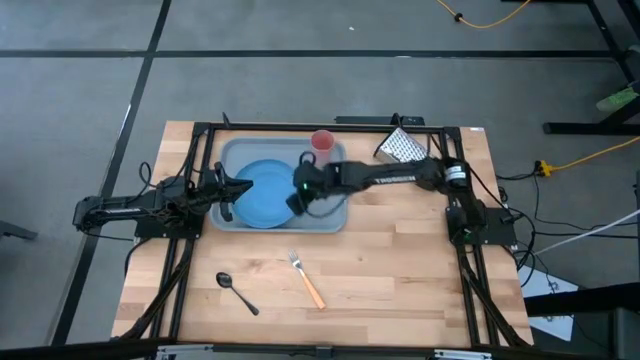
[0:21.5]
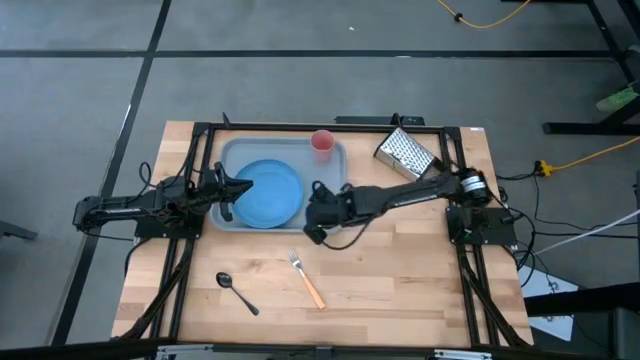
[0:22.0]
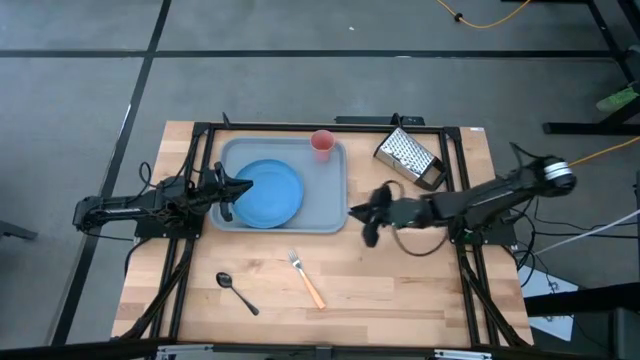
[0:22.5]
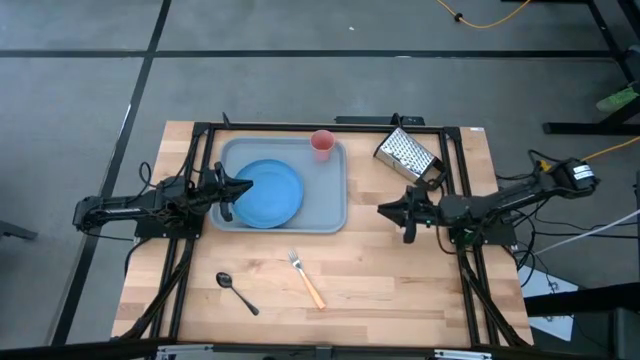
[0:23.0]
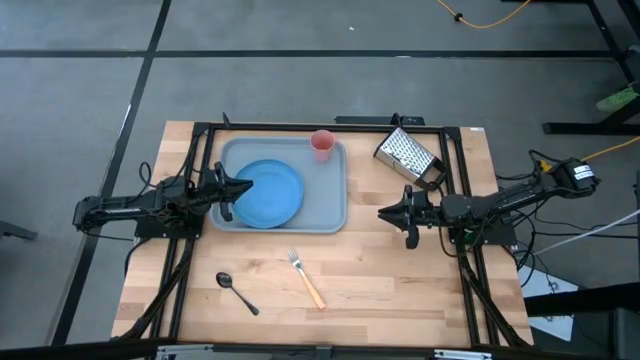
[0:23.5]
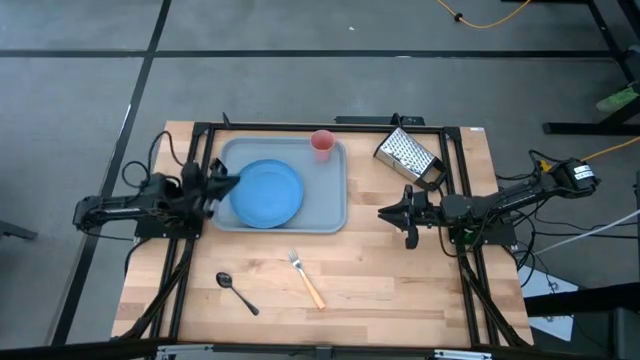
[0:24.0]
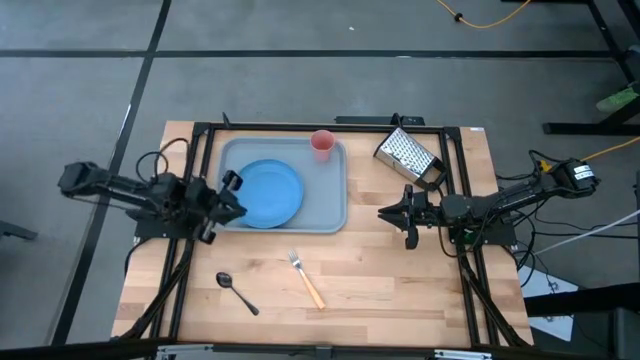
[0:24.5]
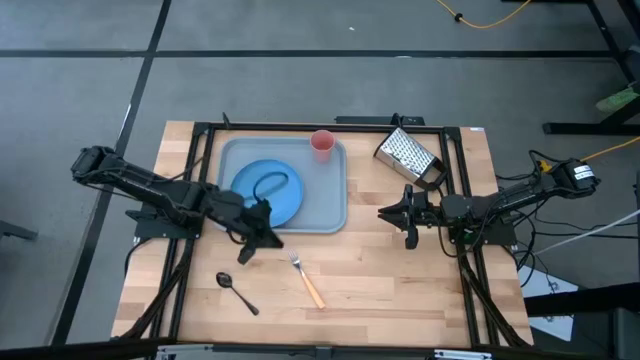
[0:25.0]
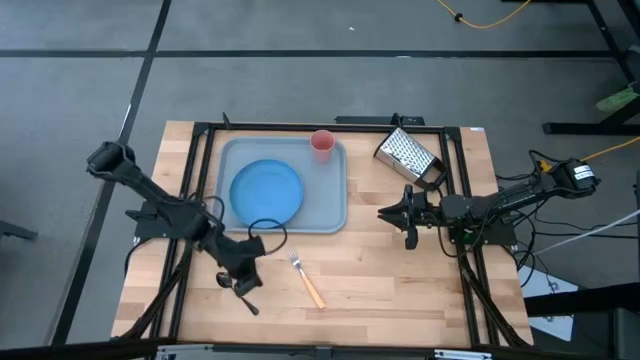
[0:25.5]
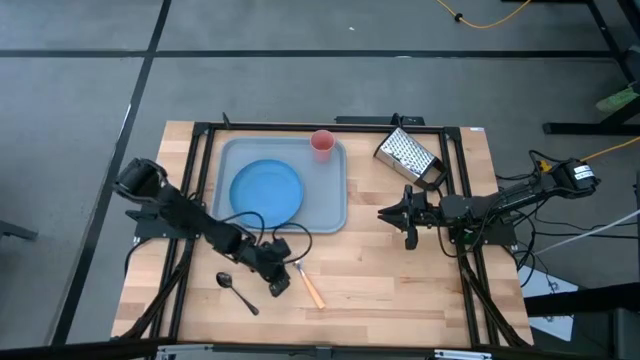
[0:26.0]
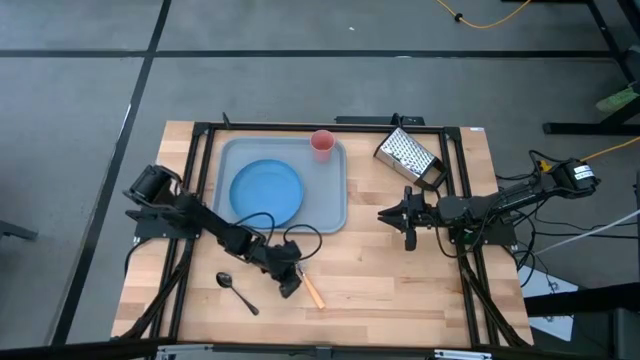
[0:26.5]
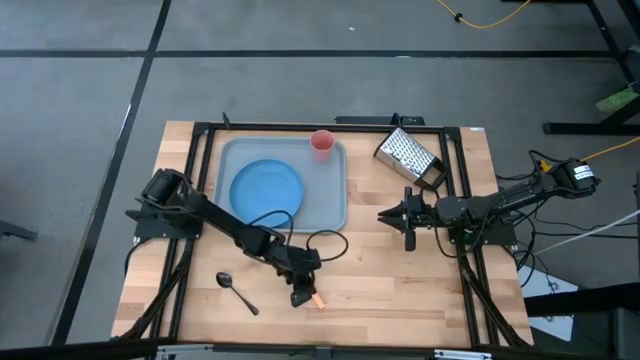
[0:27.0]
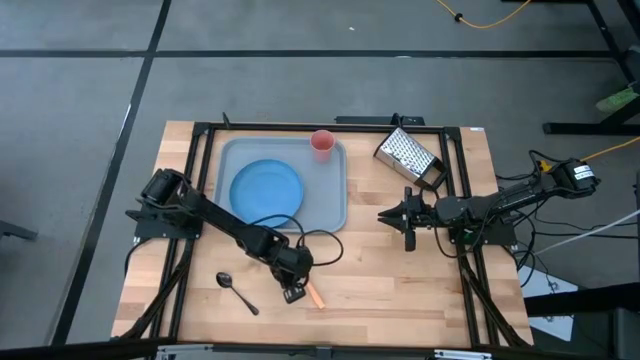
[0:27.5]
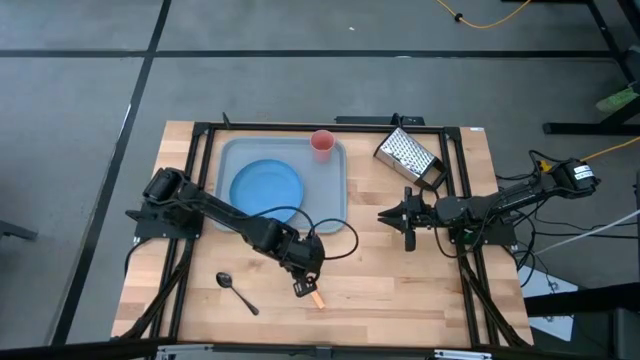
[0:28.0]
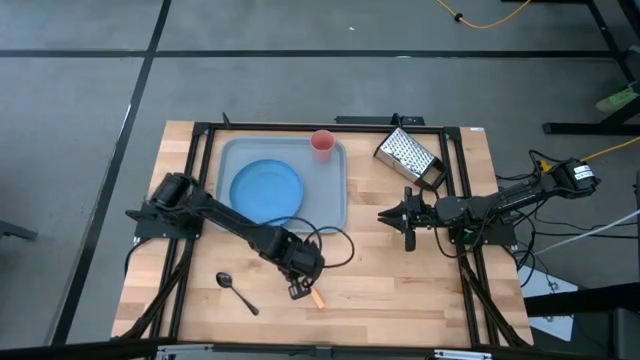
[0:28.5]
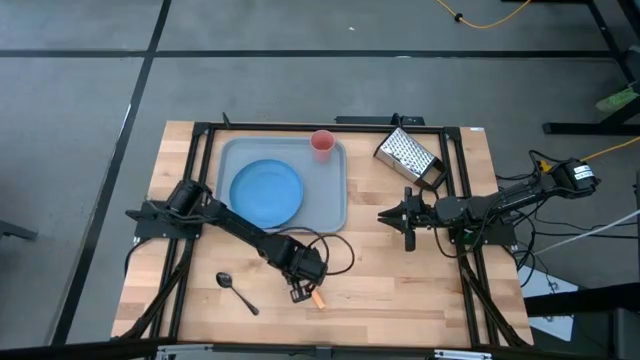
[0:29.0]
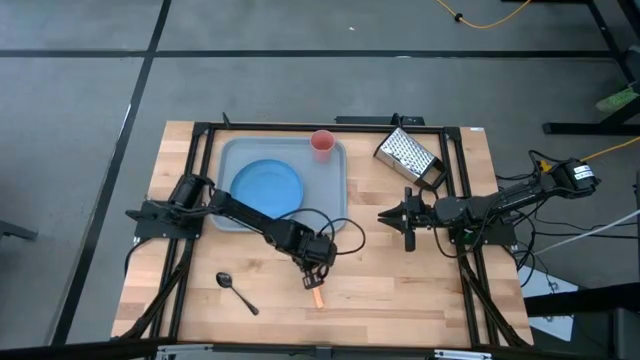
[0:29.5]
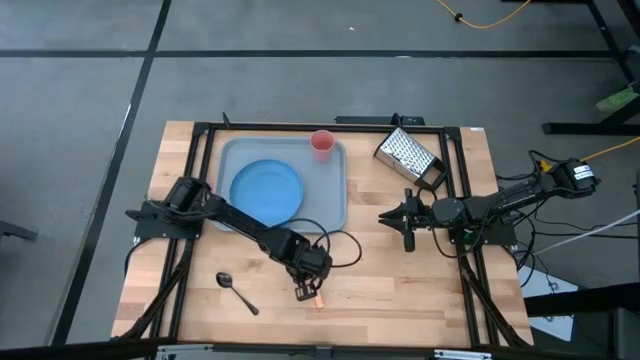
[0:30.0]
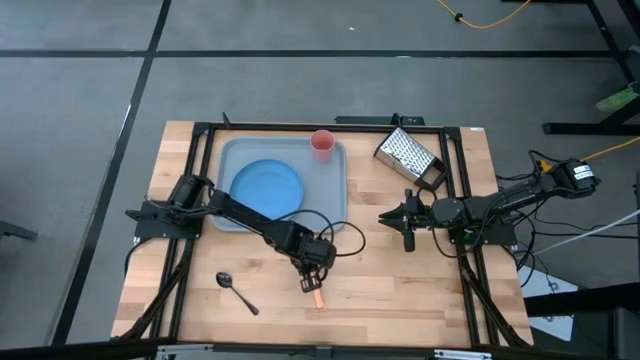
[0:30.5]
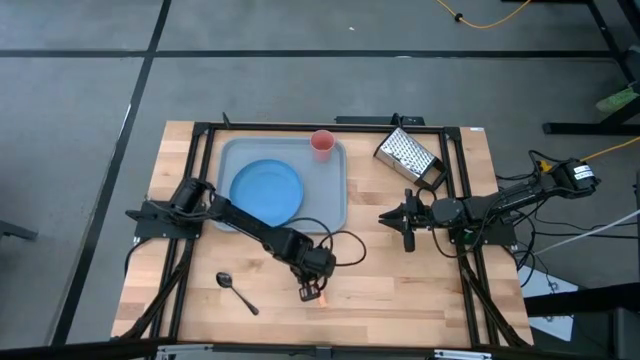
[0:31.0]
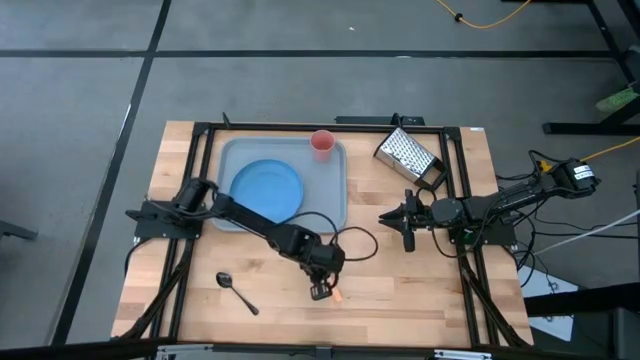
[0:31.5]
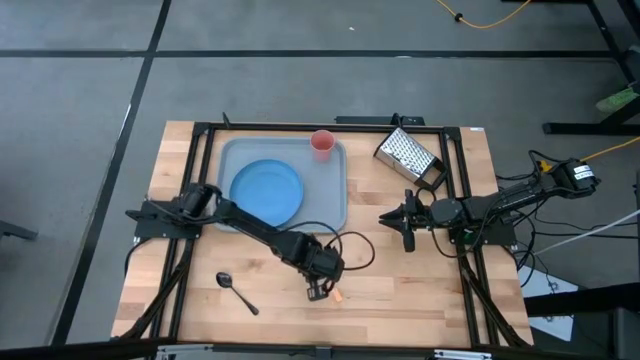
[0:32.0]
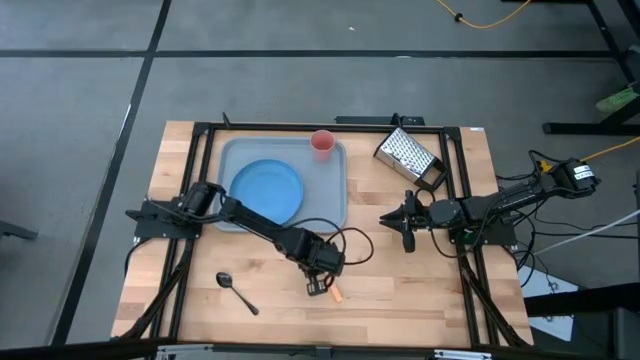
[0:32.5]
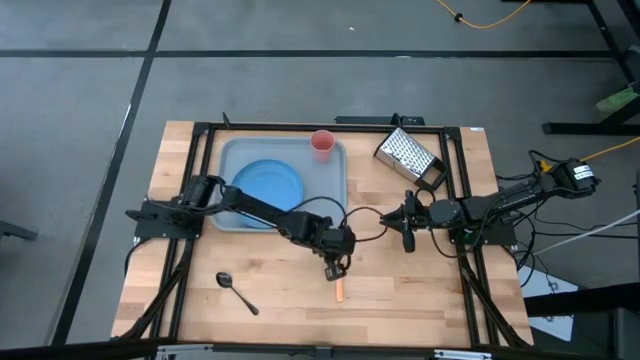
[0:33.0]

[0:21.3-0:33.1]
Task: Pick and place plate/cup/fork/spoon on tray
Move the orange fork to the bottom center of the table

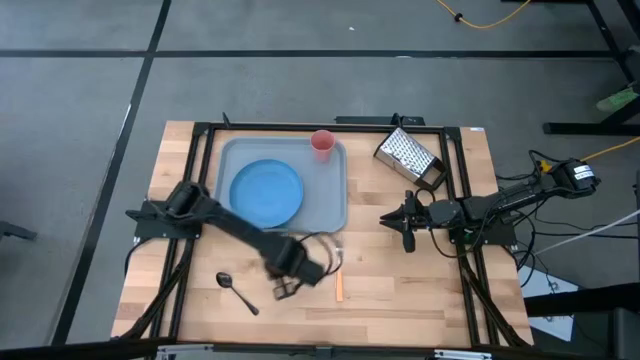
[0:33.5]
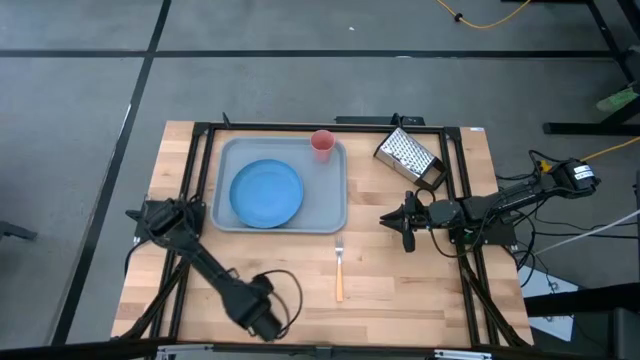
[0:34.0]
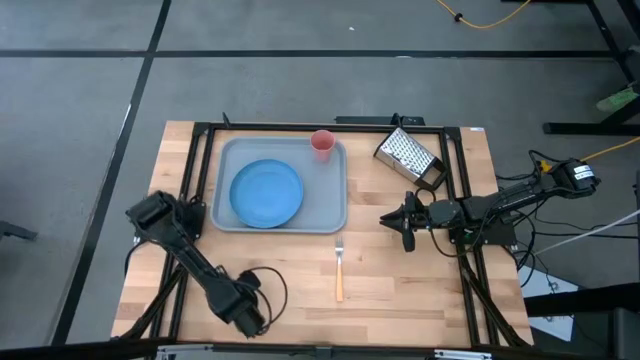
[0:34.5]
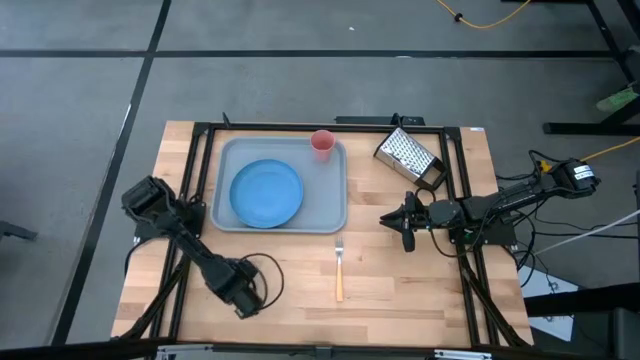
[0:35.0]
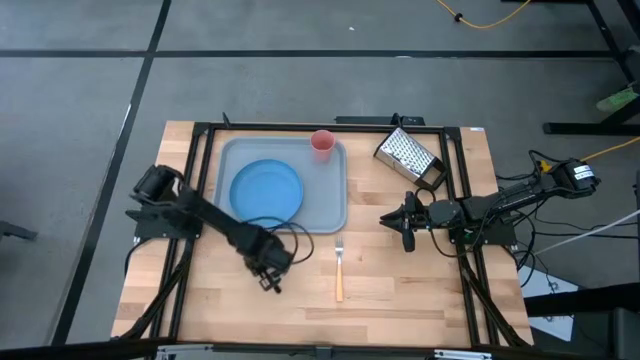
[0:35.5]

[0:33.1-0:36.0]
Move the black spoon to the bottom center of the table

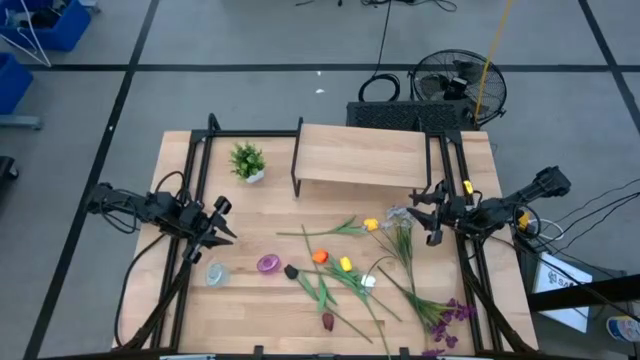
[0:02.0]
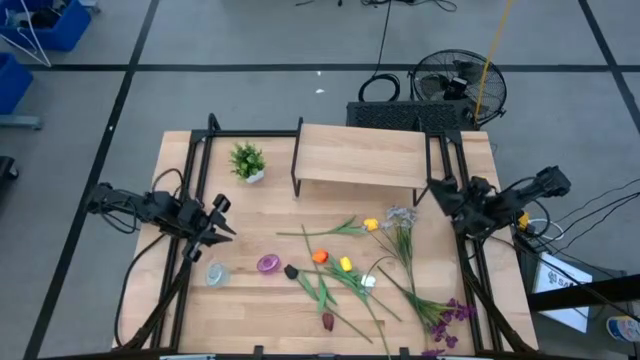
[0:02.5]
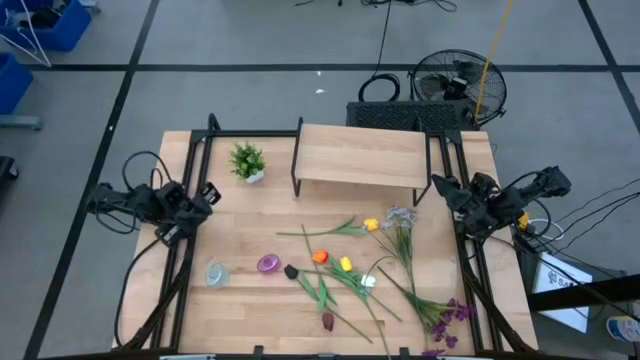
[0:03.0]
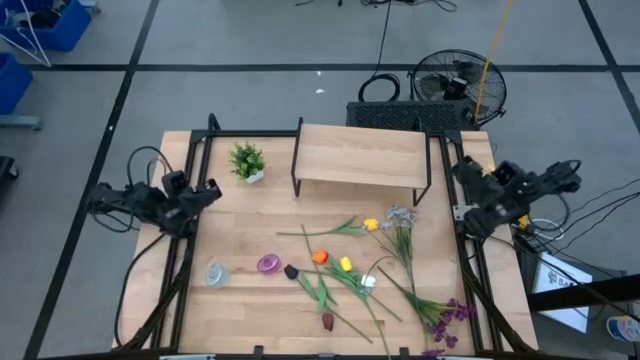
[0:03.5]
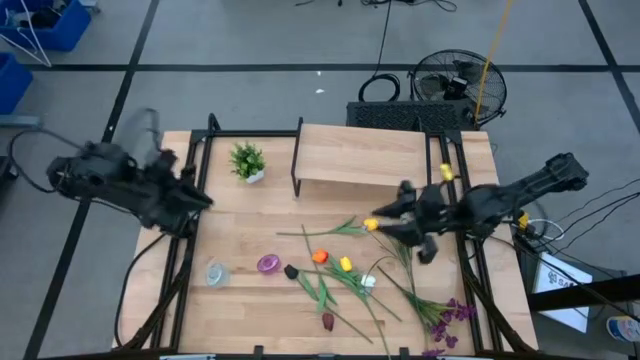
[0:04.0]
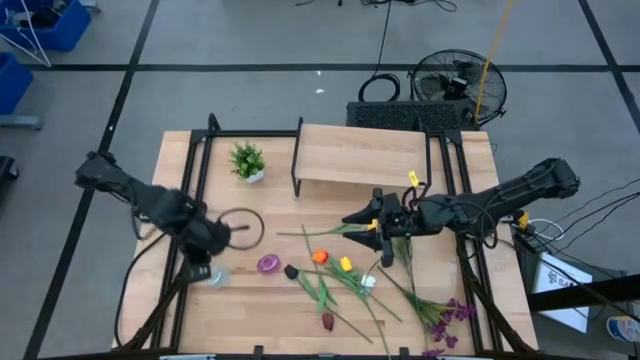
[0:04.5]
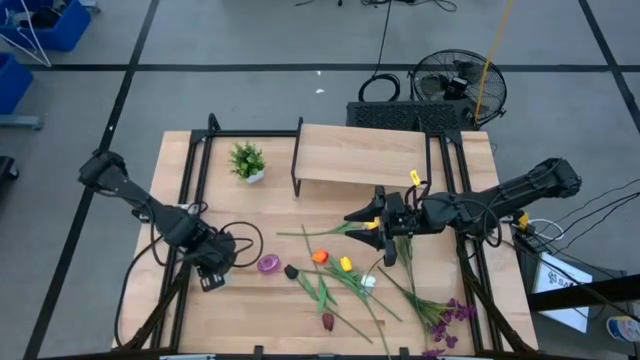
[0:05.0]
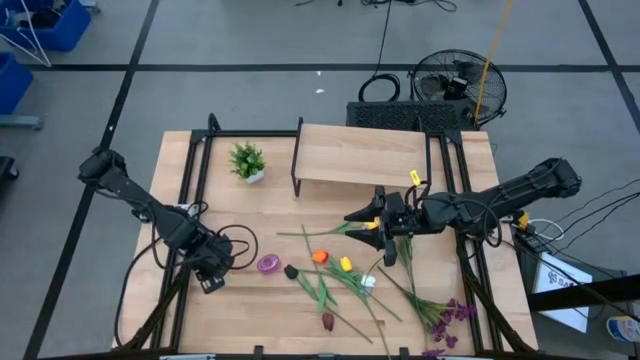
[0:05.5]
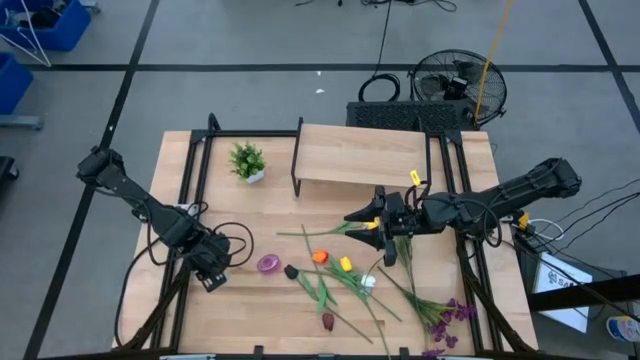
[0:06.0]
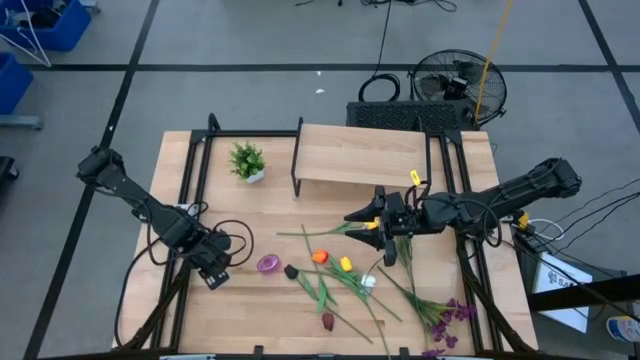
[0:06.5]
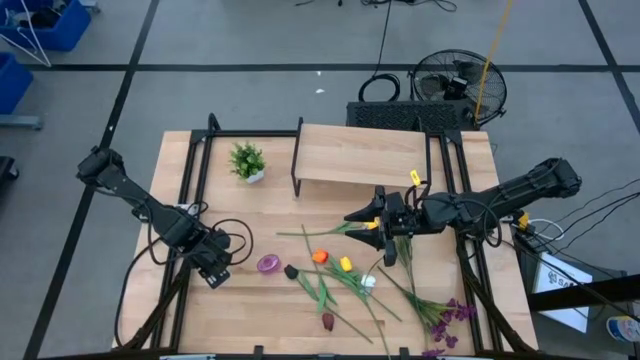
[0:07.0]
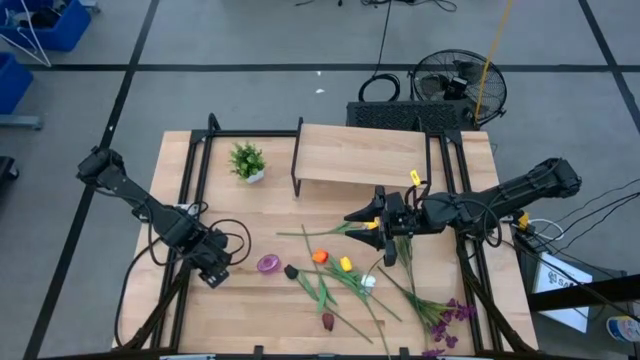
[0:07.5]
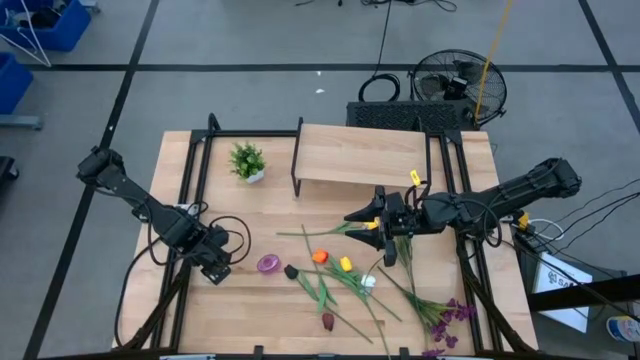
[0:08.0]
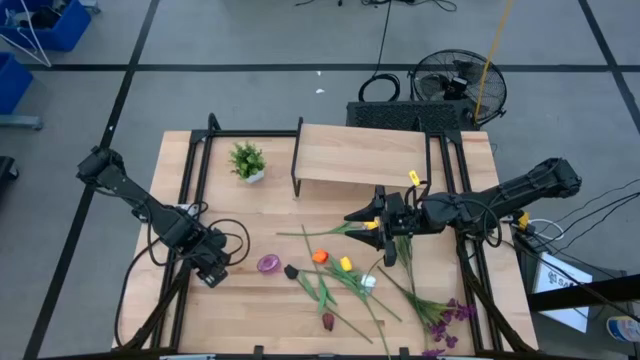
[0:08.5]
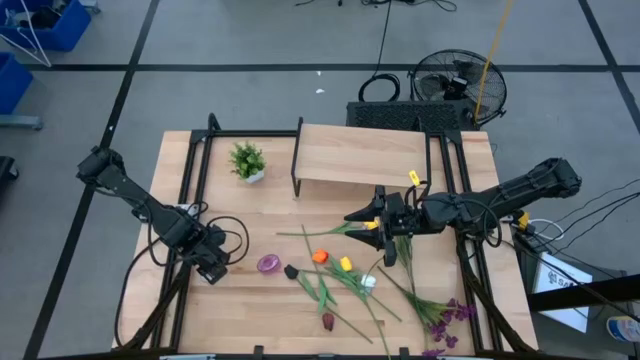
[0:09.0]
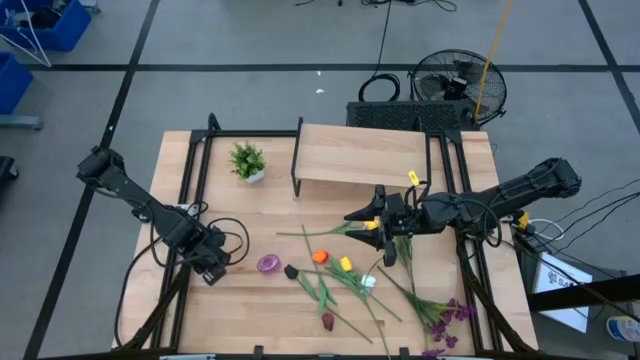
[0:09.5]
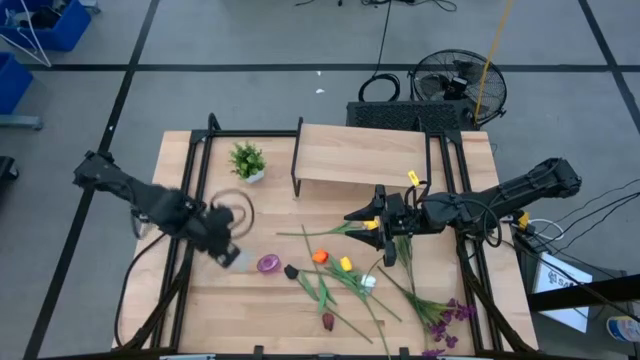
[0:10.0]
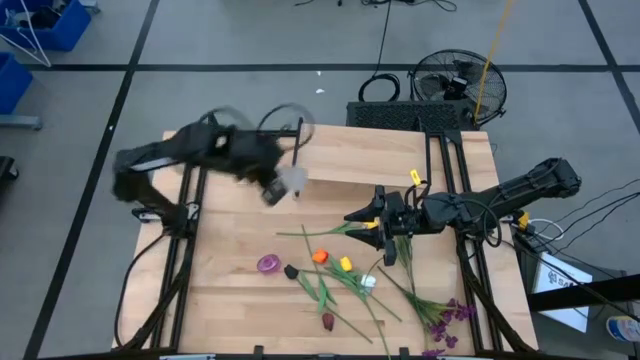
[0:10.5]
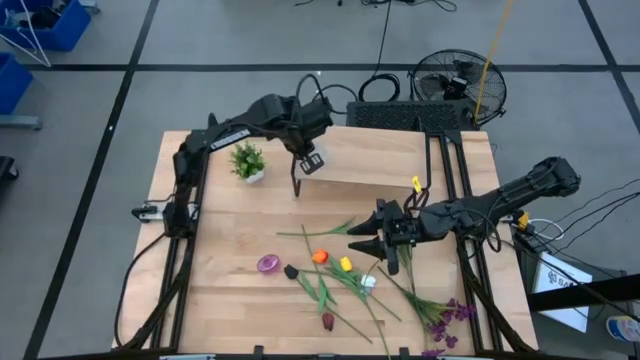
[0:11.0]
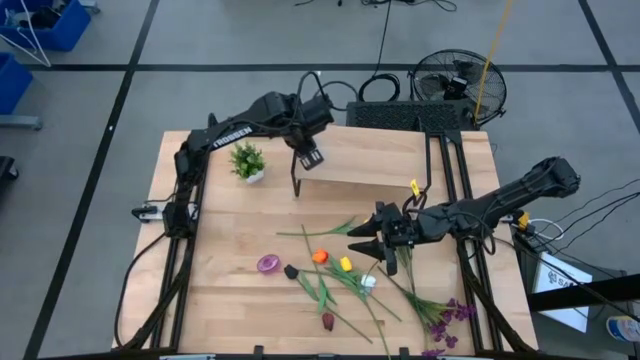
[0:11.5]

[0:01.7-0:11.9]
Task: Pick and place flowers into a vace then onto a shelf
Put the transparent vase on the shelf
